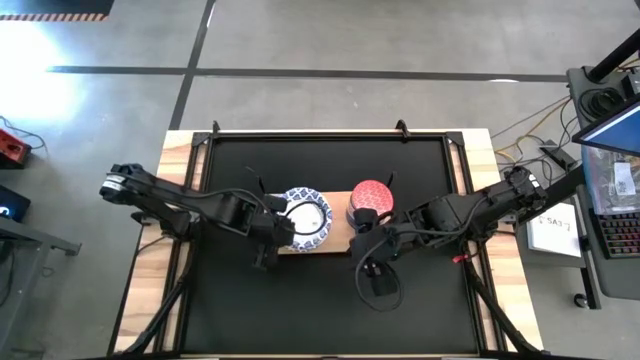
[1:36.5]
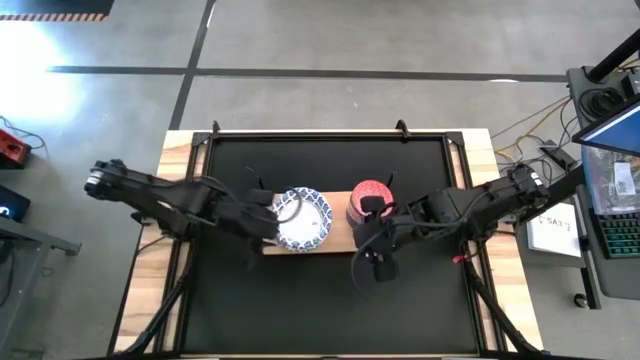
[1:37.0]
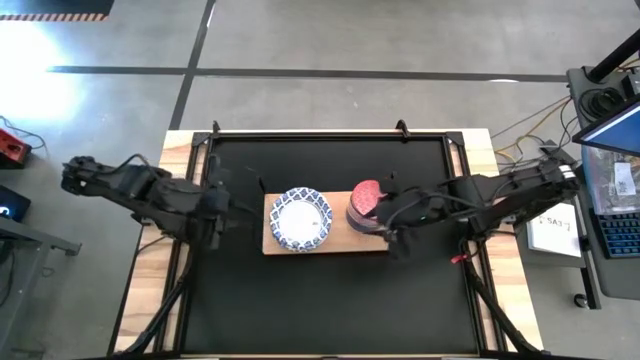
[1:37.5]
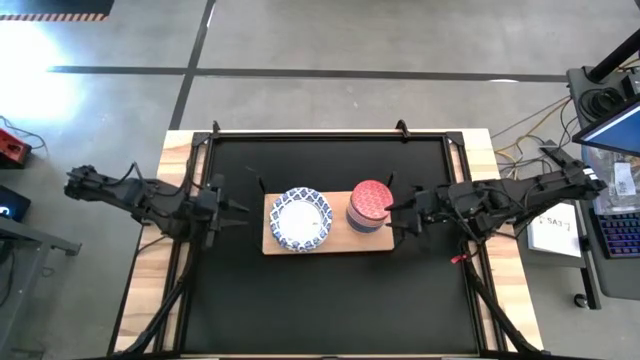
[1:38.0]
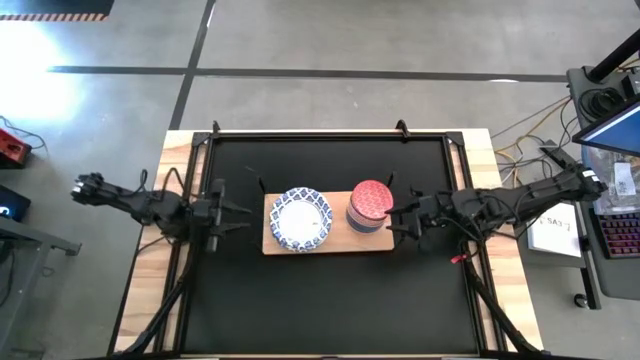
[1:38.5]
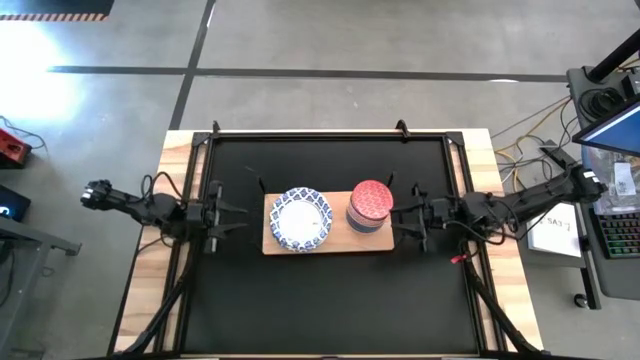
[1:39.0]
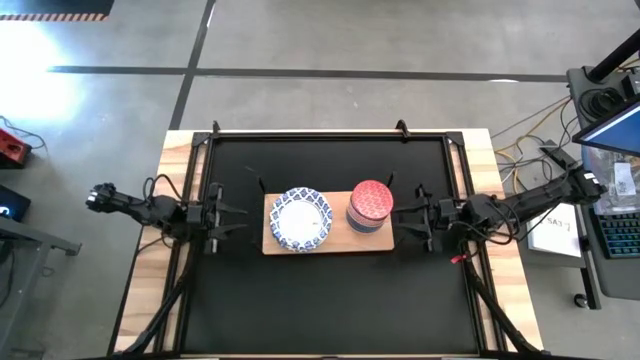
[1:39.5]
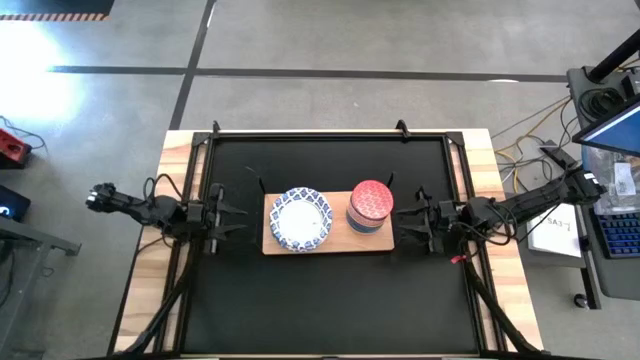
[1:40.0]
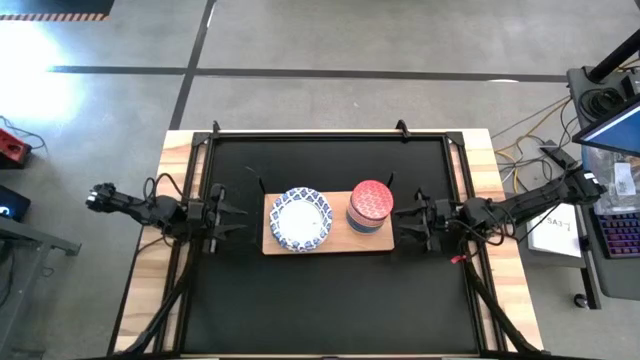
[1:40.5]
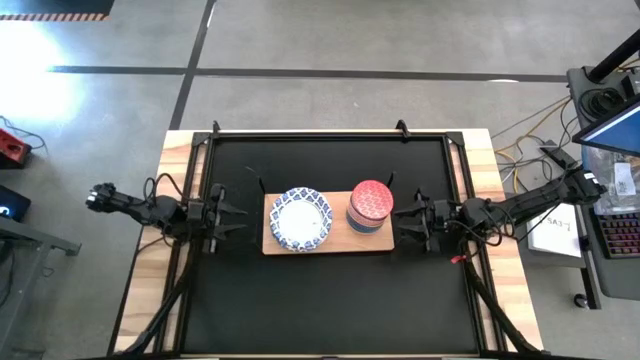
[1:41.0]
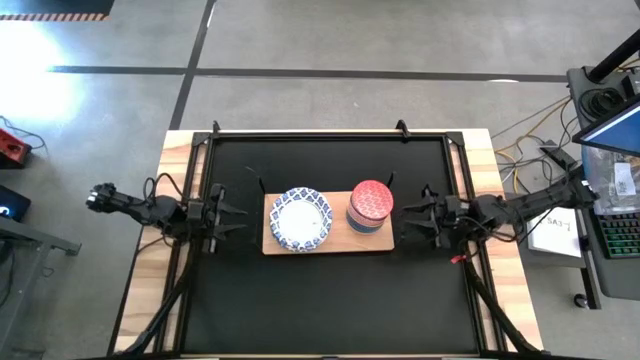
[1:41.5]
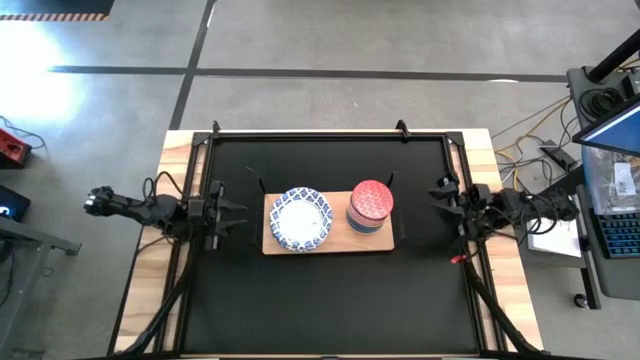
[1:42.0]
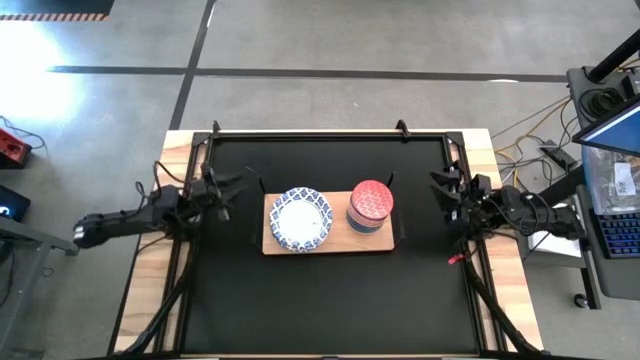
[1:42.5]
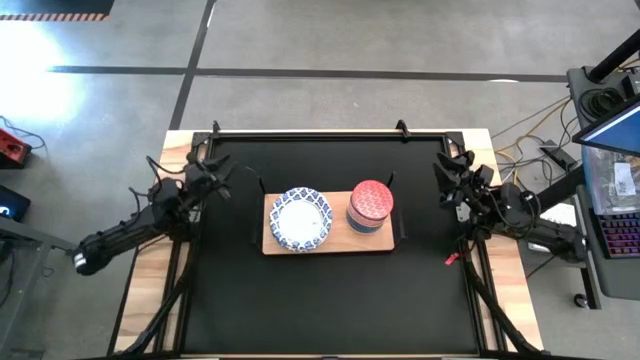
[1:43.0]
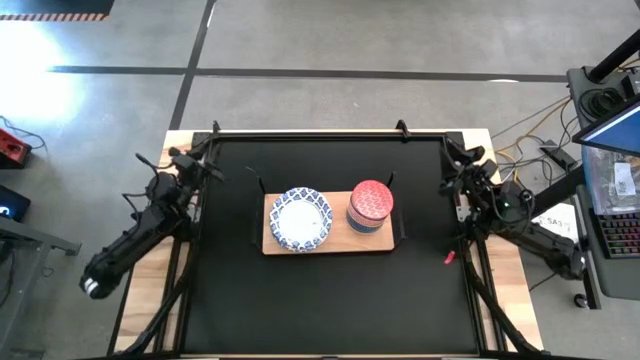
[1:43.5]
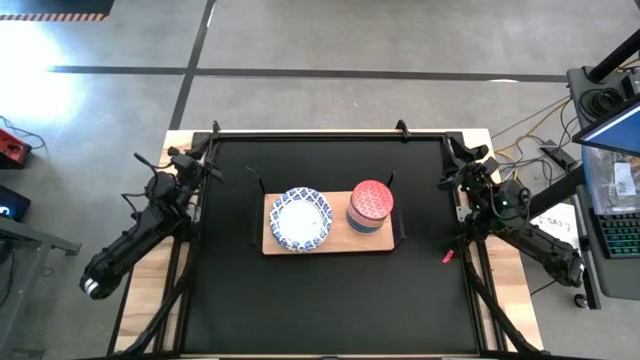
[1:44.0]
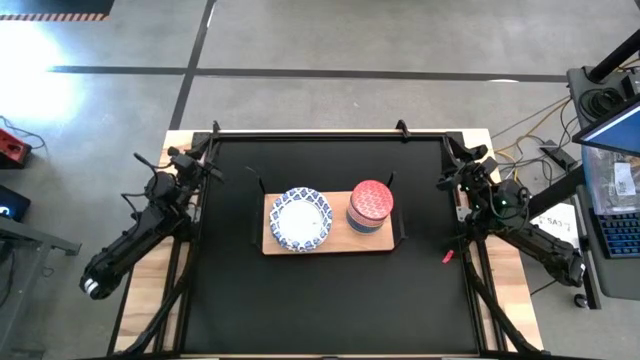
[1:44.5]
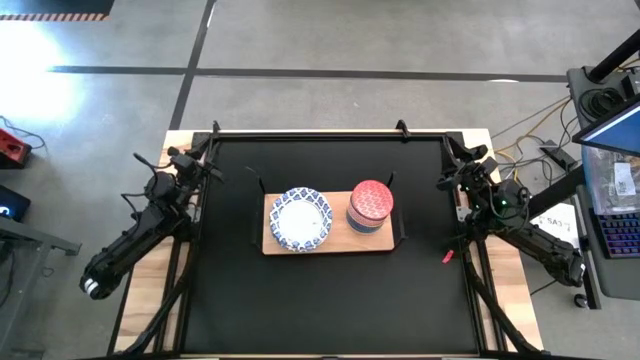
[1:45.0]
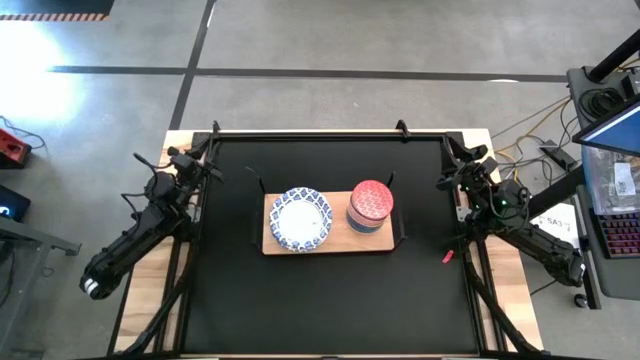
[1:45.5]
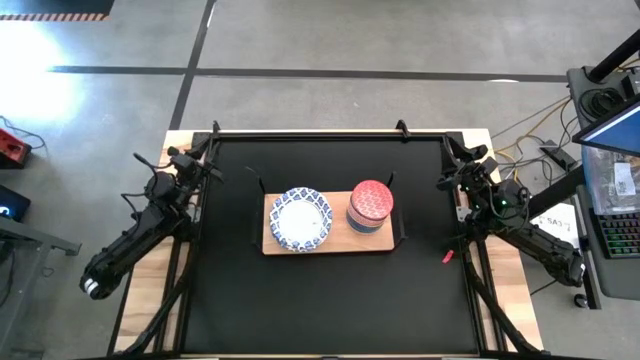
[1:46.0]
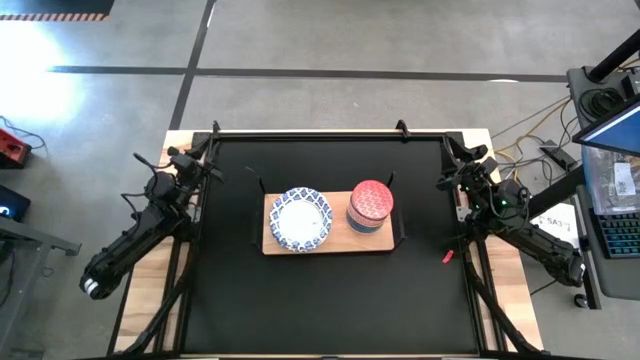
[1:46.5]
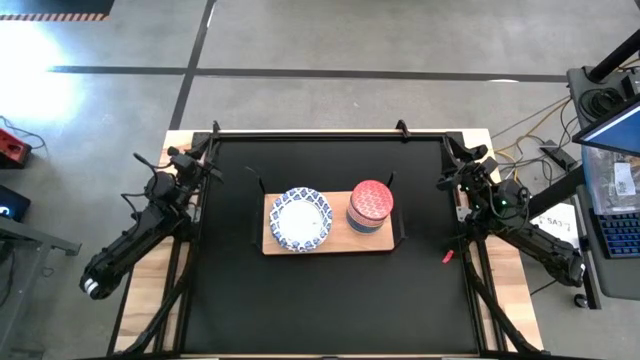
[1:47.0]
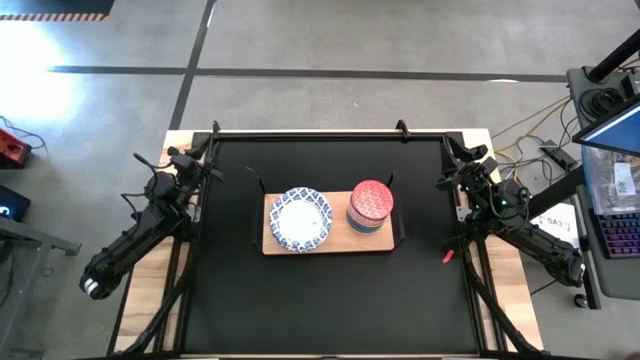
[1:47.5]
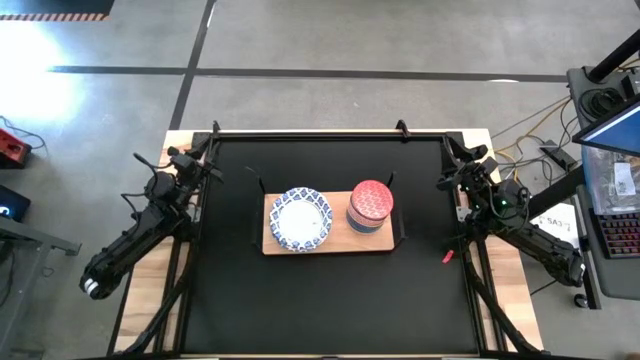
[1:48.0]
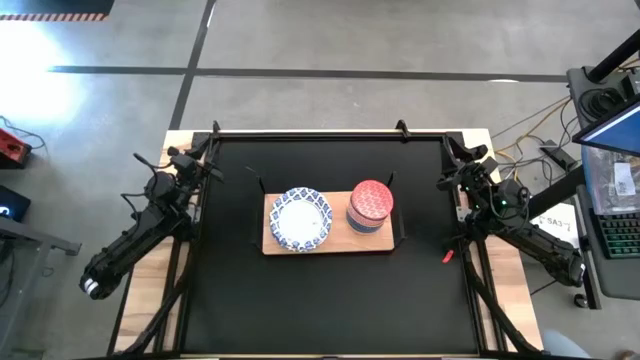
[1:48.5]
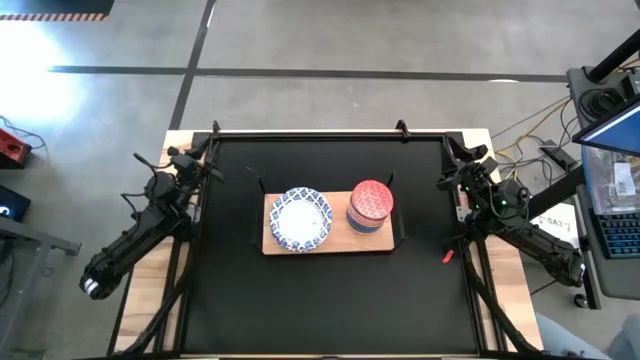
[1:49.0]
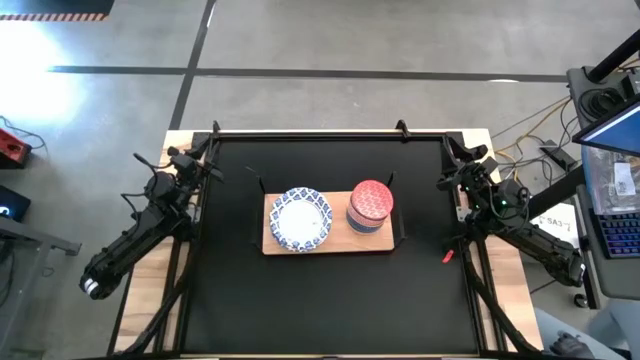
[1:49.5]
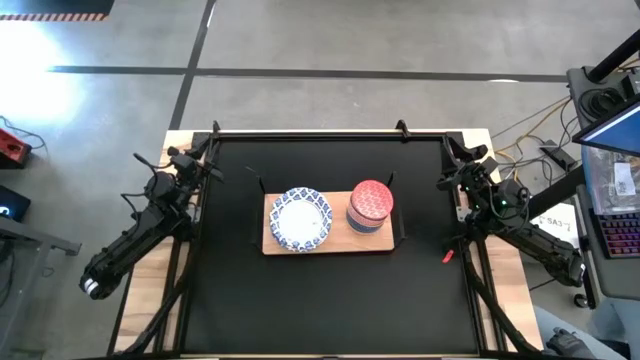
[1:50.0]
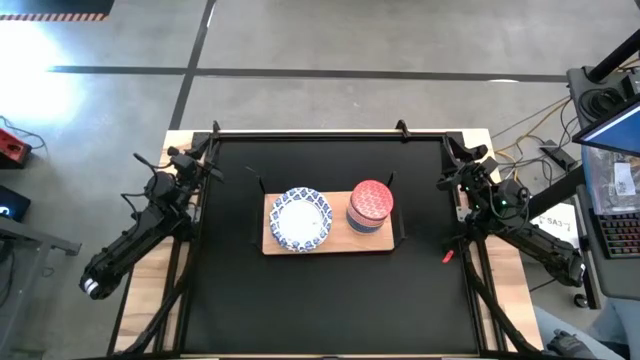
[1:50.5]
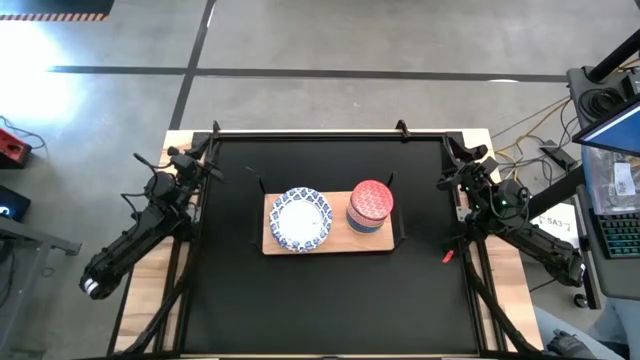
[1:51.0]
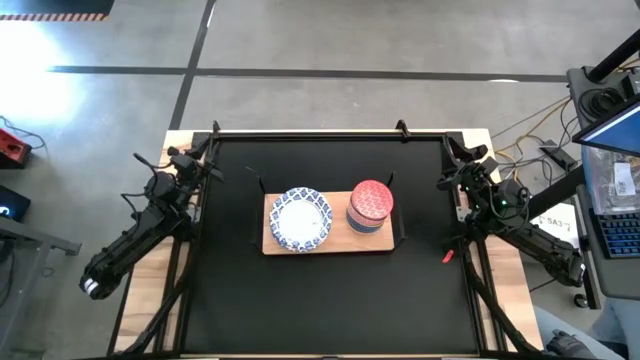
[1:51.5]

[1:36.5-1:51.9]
Task: Place and stack bowls onto a shelf
Return to Home Position

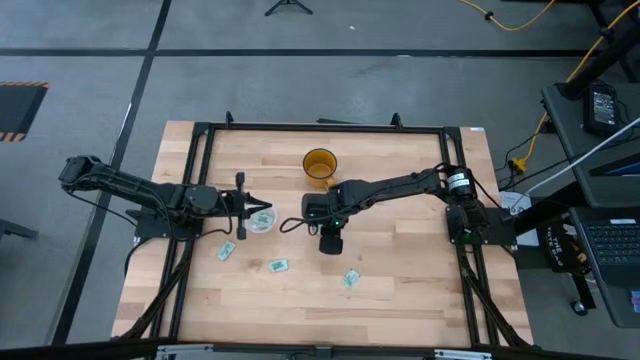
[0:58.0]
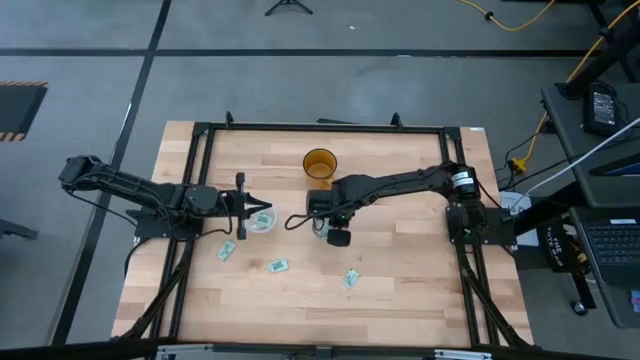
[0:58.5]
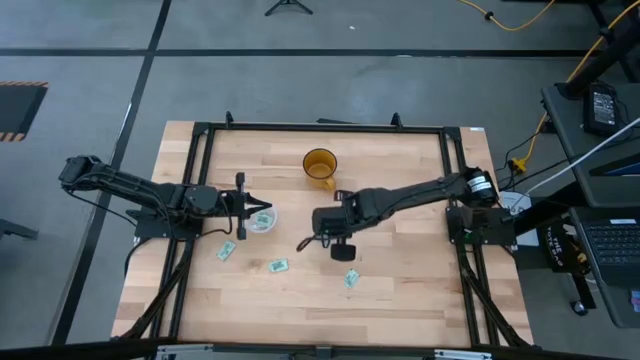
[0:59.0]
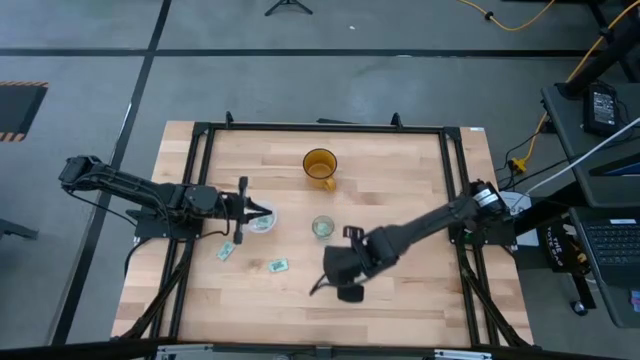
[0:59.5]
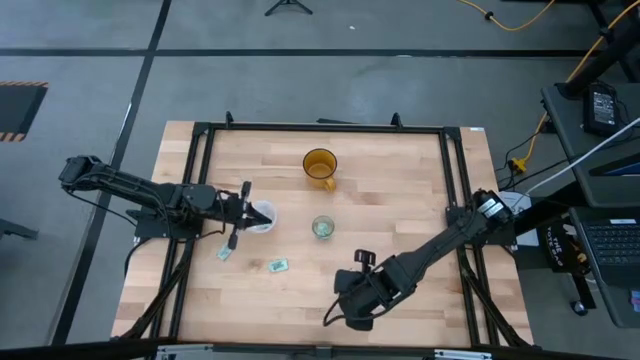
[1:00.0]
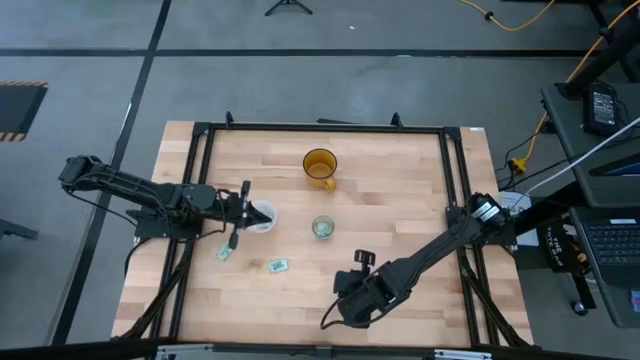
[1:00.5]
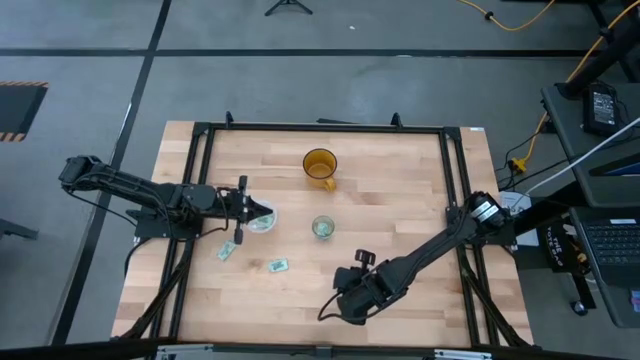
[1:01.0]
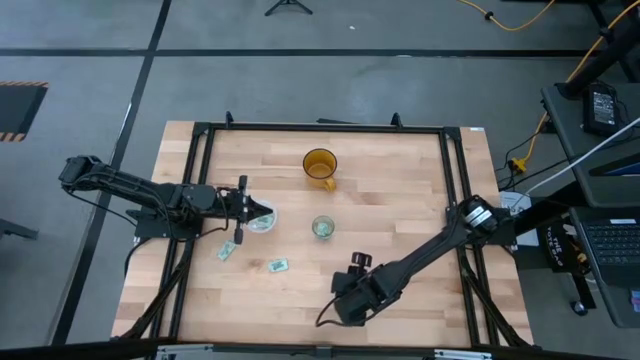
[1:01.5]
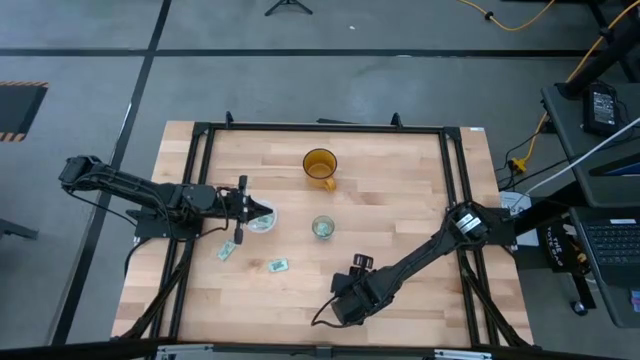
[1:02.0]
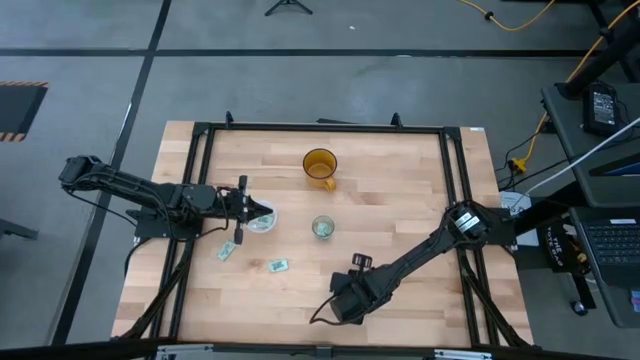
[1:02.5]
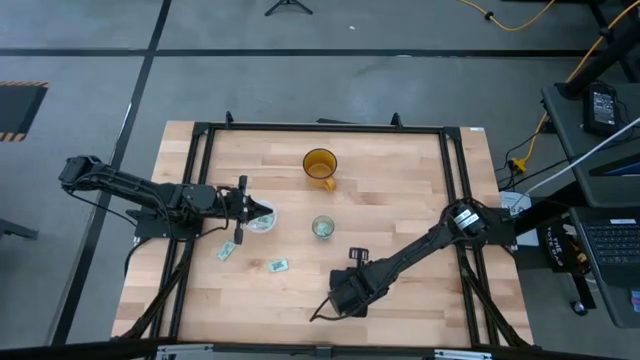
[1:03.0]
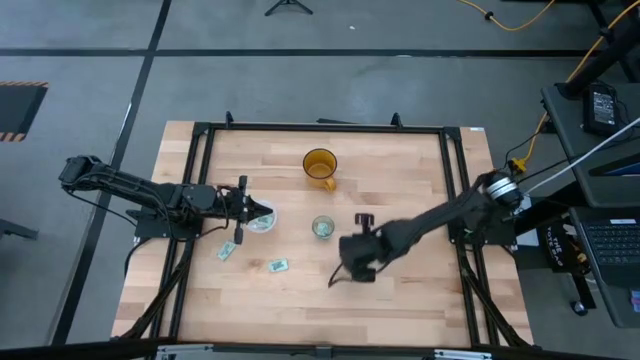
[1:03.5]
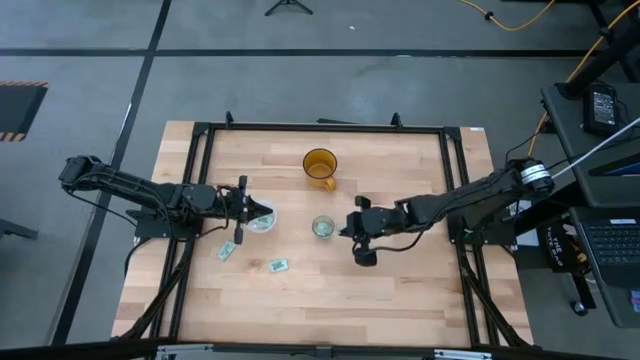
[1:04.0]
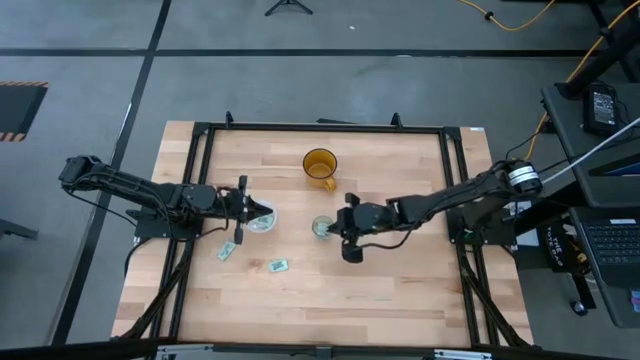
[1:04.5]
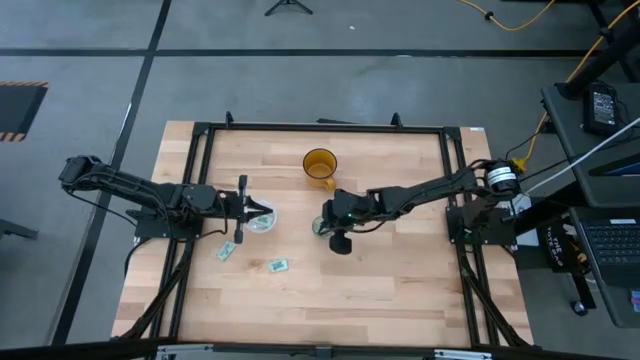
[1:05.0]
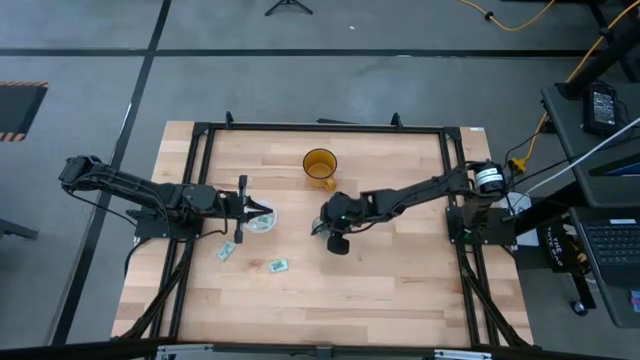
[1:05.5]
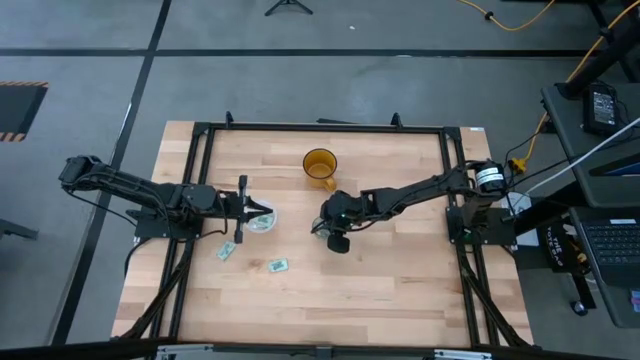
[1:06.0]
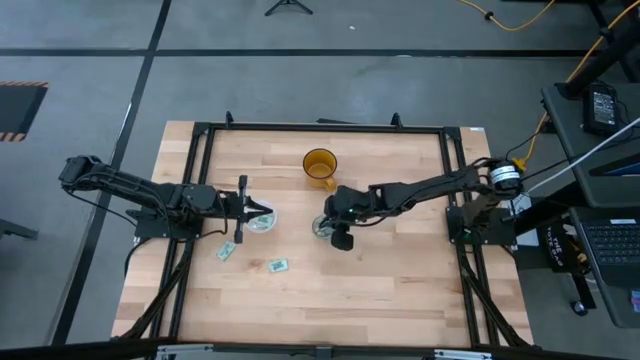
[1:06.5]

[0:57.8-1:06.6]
Task: Pick and place Stevia / Truvia into bins
Put the stevia packet into the glass tupperware
